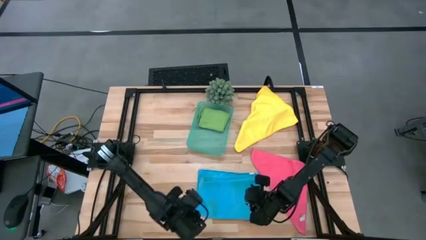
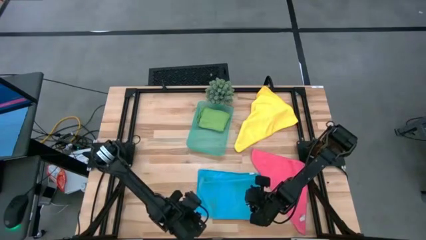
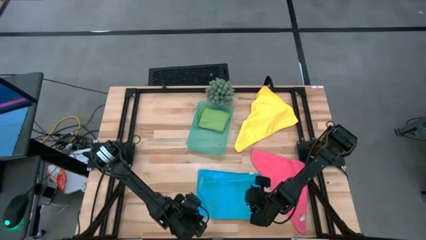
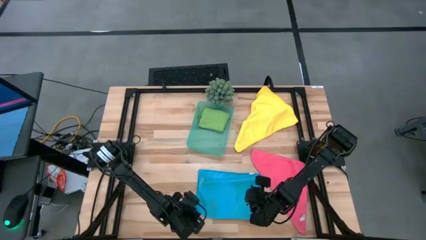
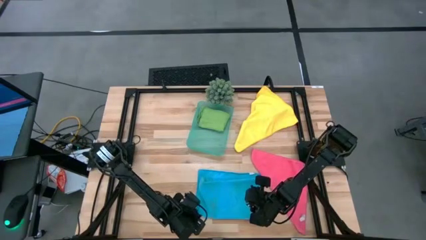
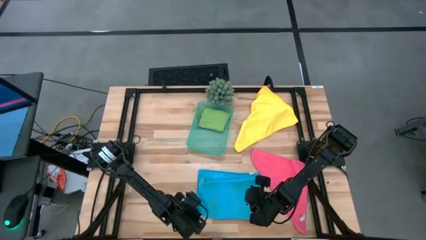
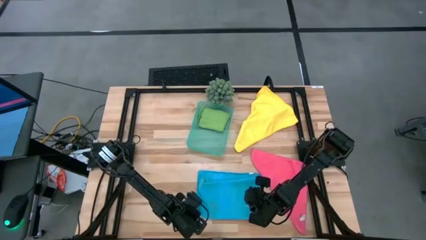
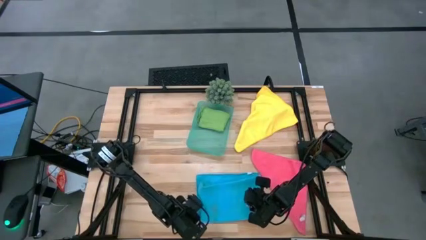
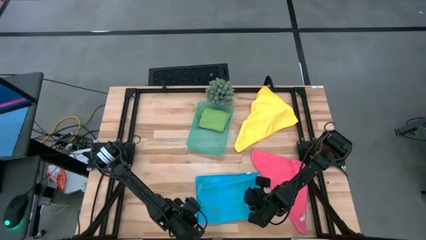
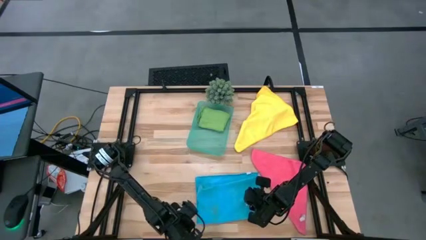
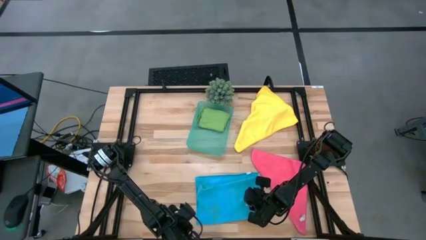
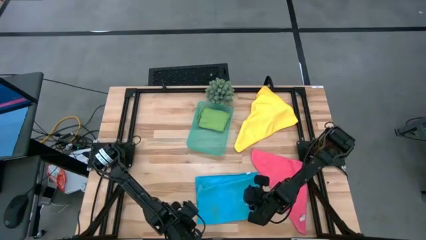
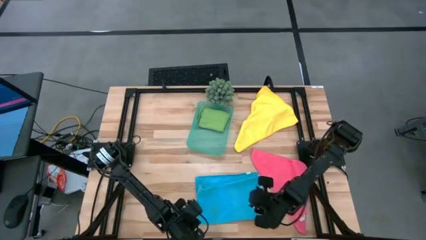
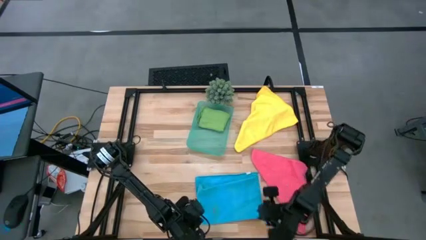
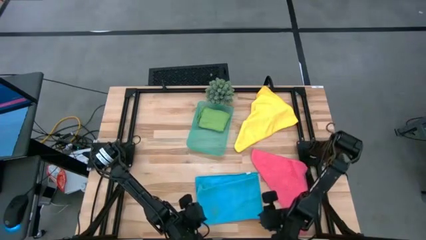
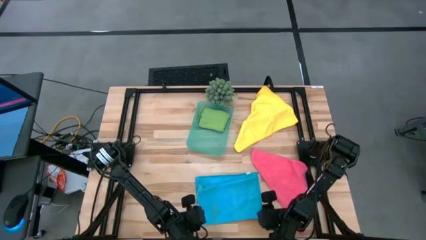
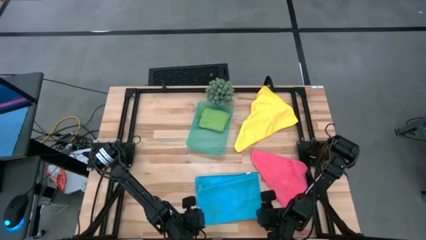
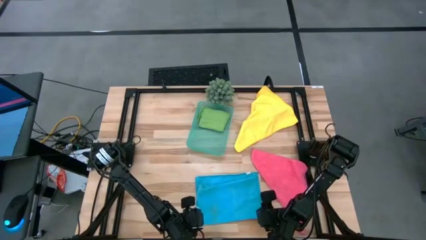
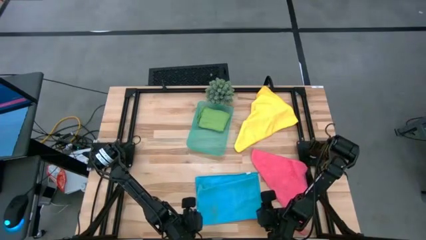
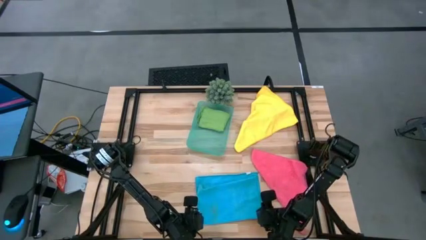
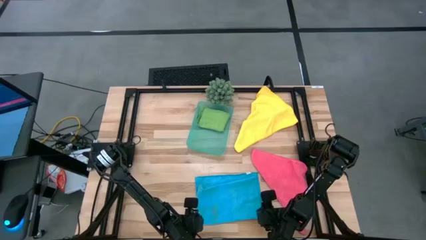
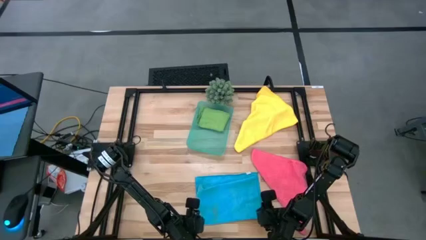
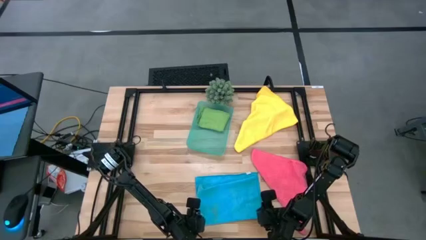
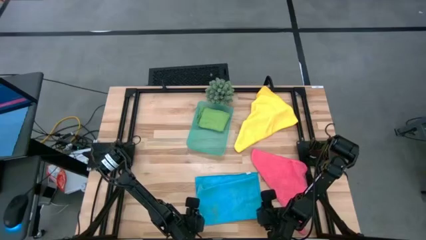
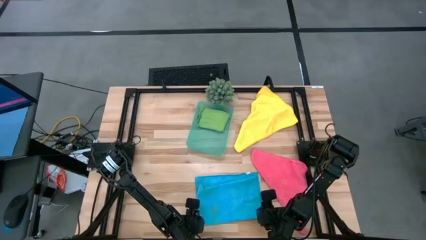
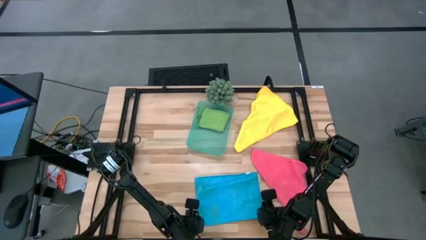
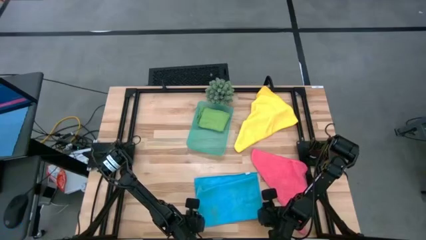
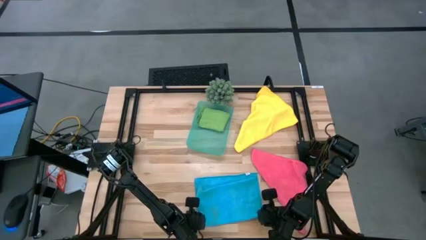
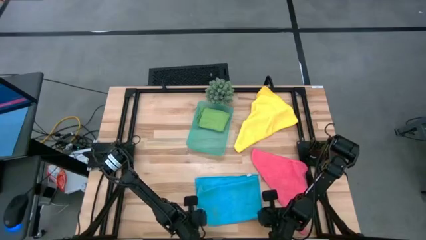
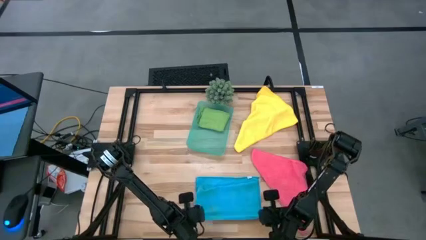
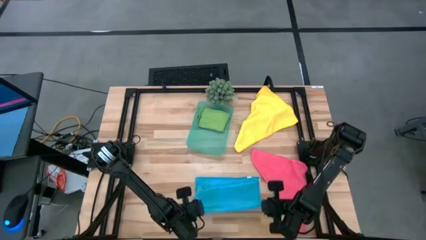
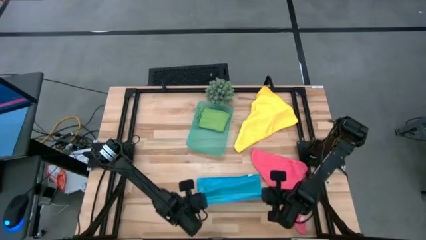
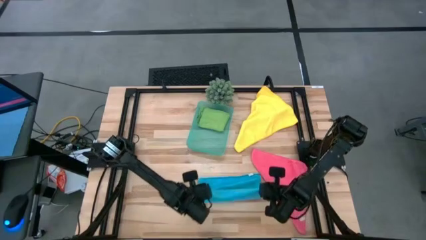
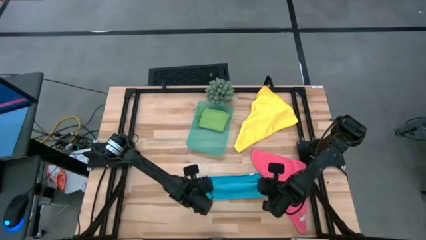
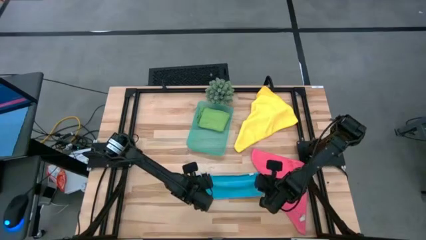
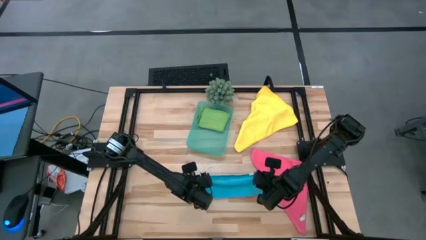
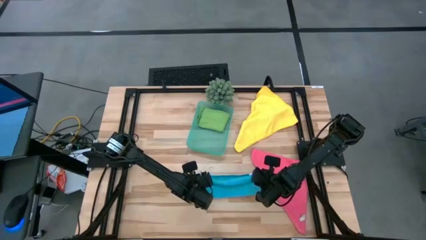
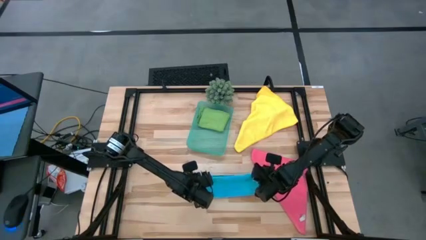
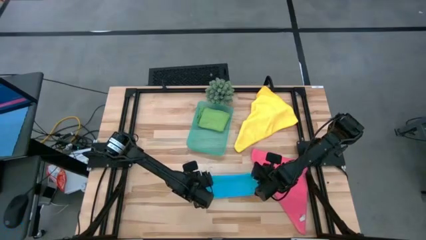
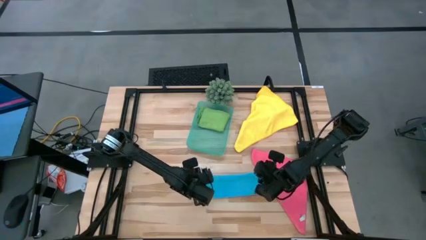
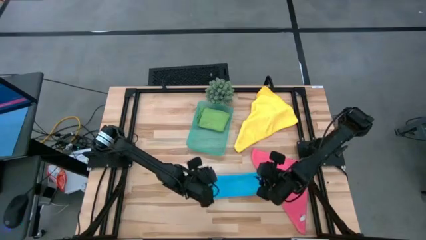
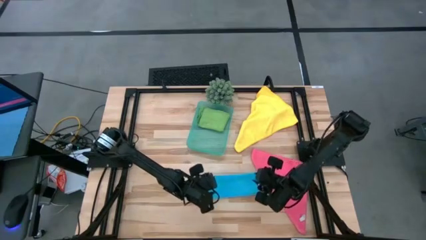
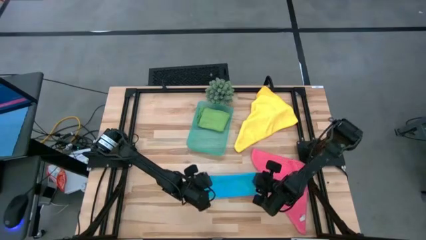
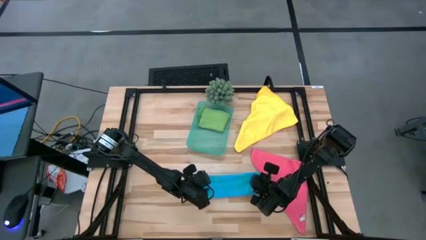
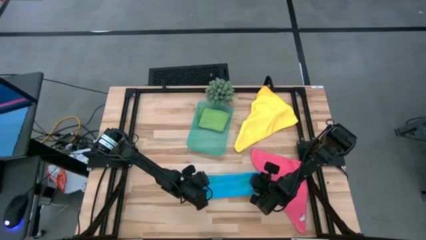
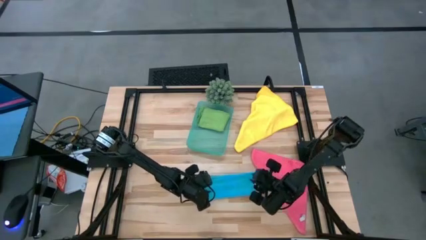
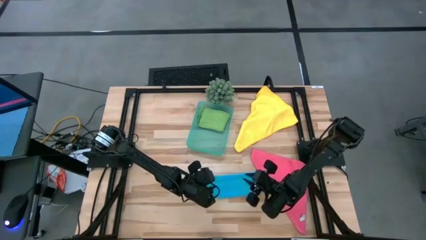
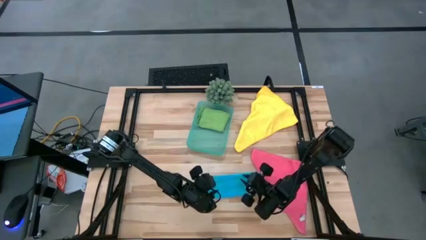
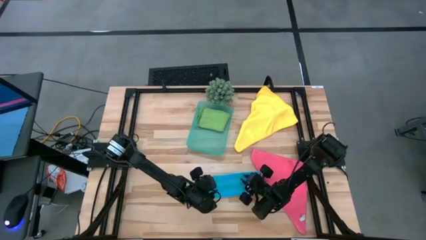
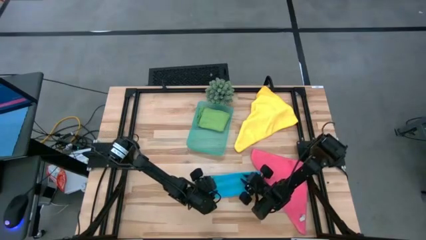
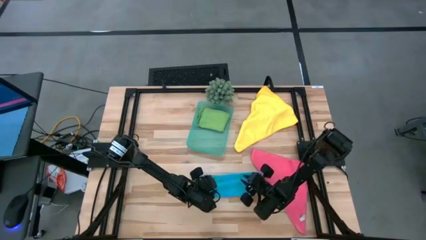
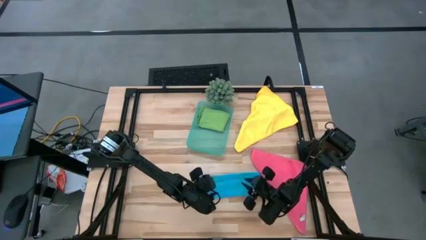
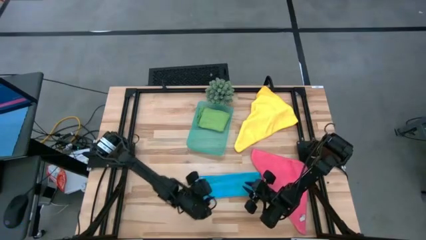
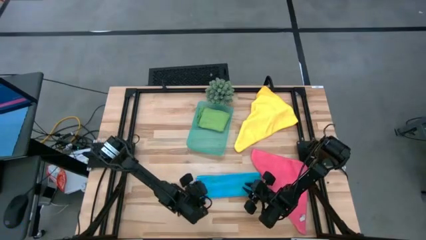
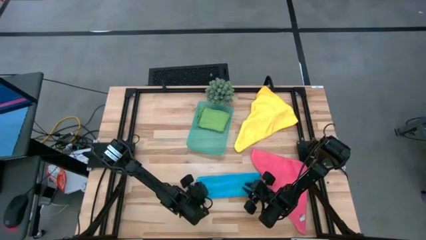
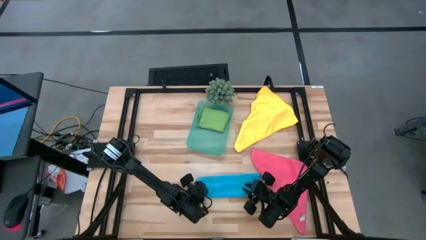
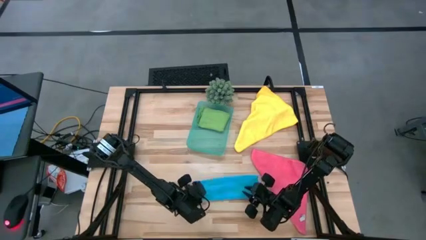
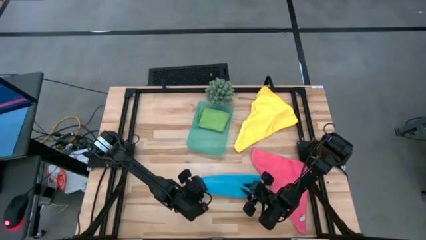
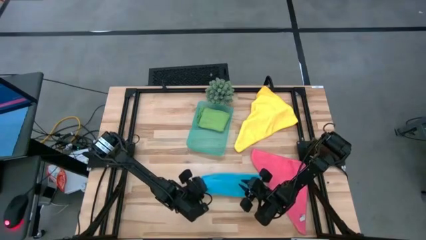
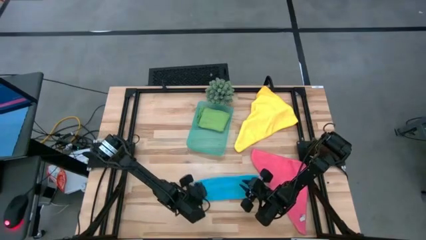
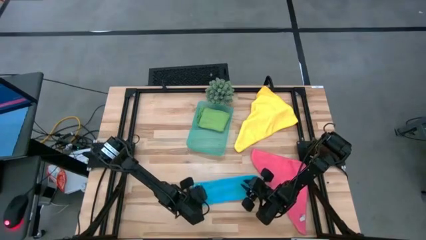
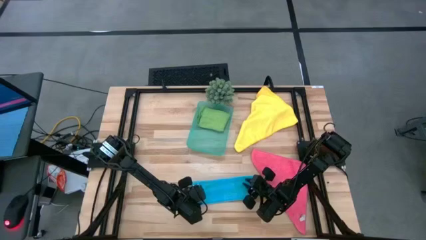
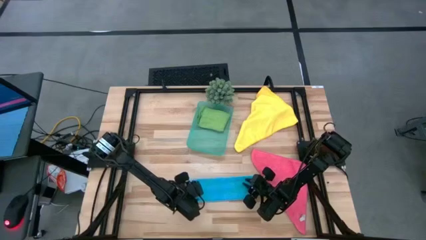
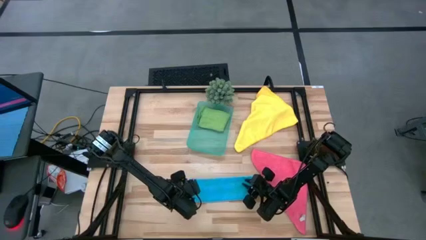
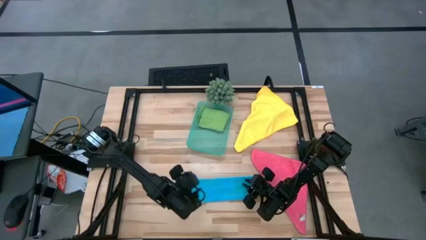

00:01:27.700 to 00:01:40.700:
Task: Fold microfiber towels
Fold the blue micro fiber cloth

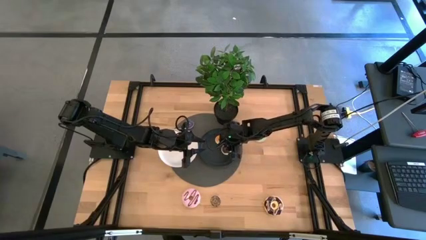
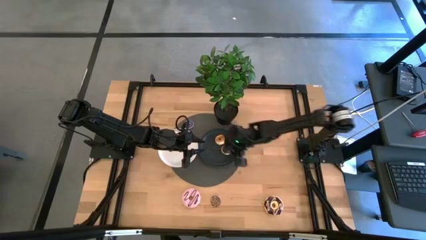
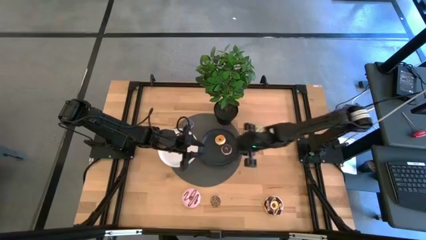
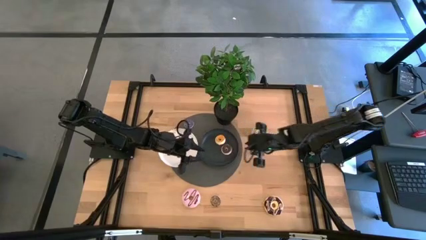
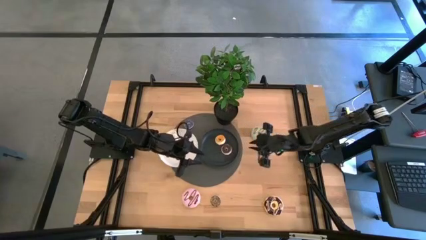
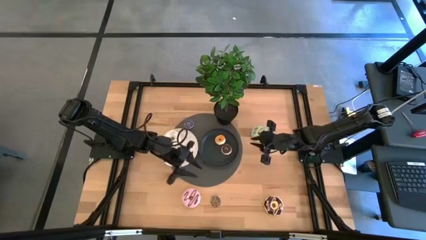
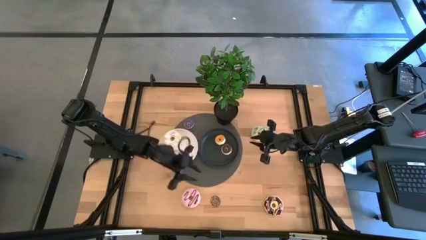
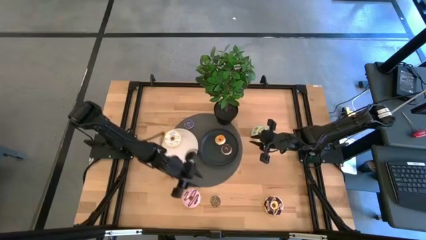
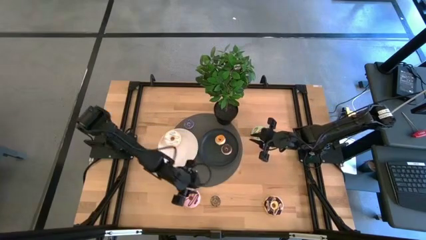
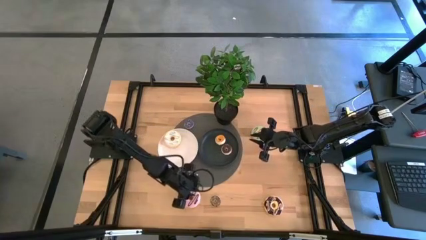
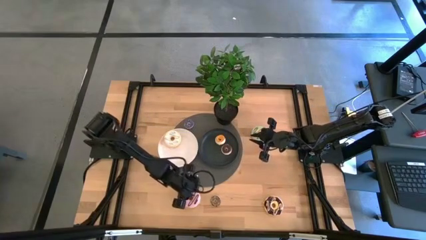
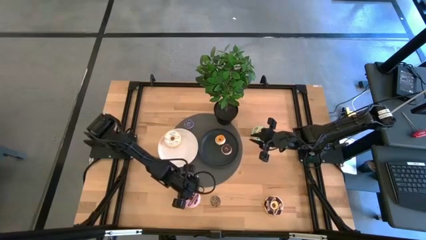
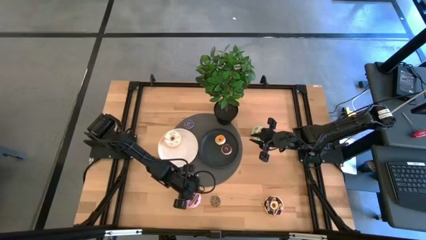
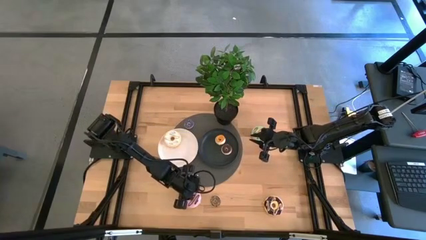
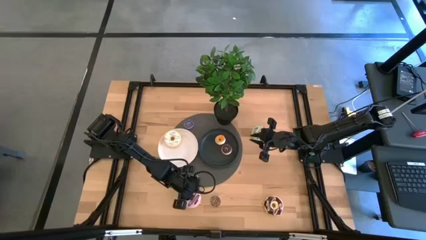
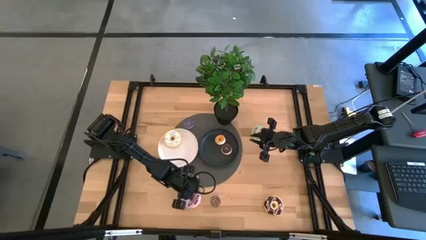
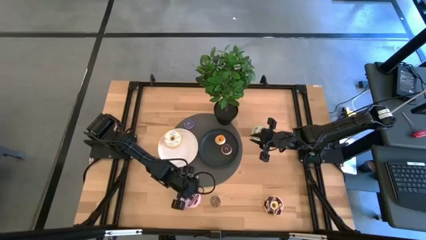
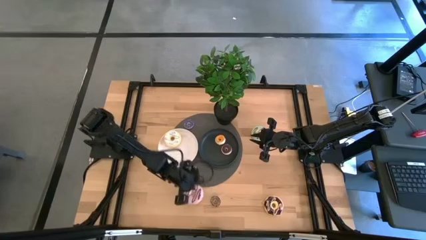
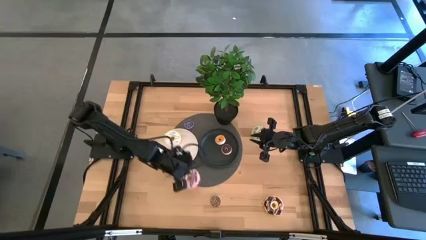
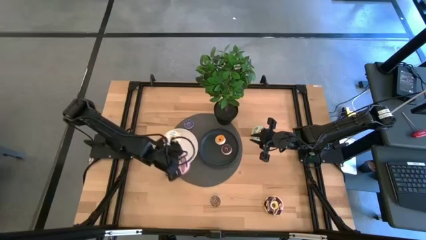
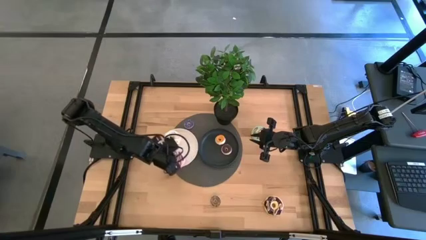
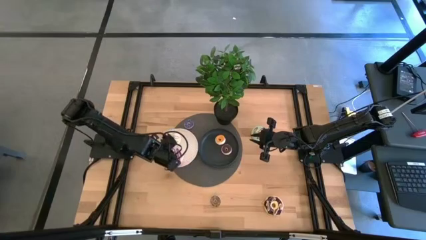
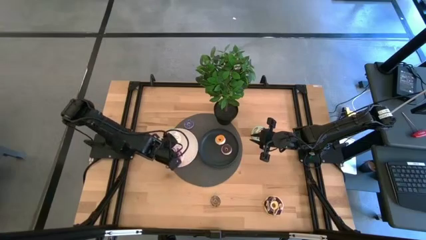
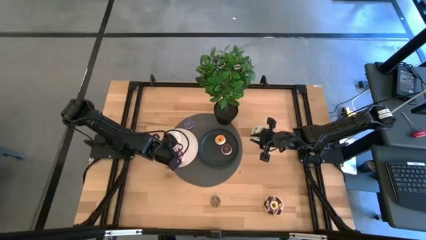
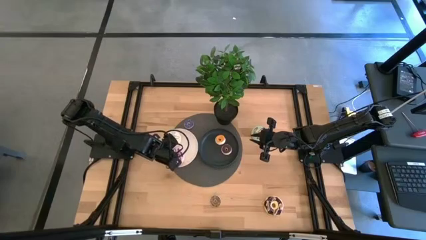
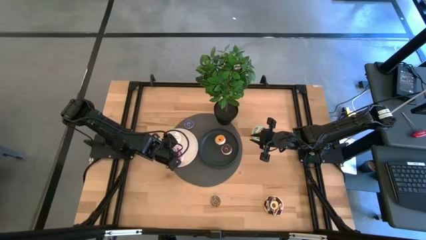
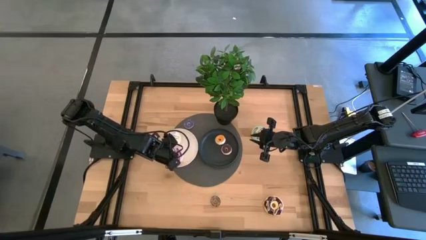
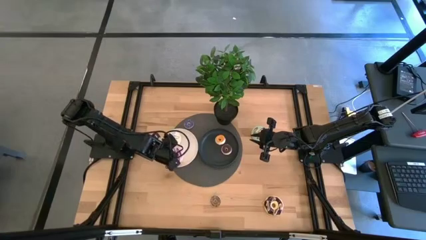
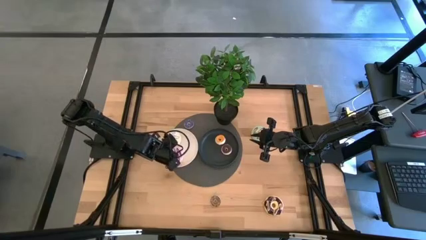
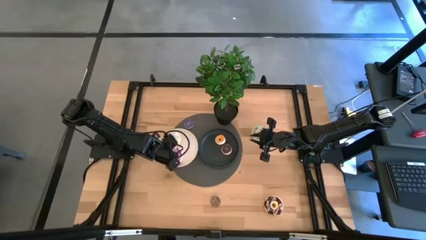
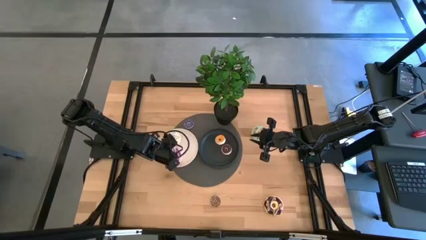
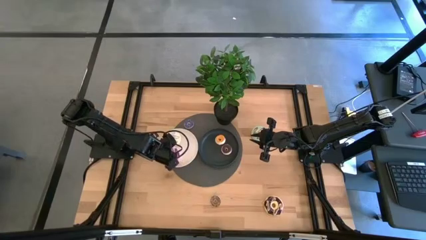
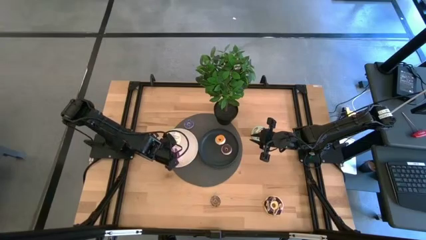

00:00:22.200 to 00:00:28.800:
Task: Pick & Place donuts
Put the large purple donut on the white plate
